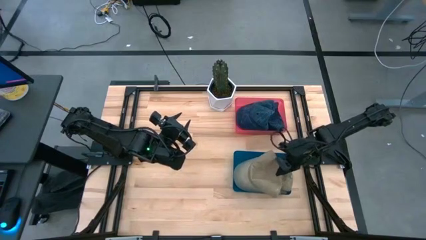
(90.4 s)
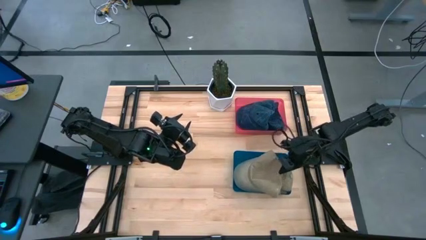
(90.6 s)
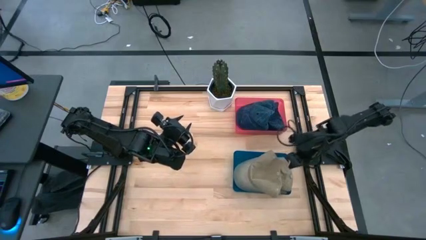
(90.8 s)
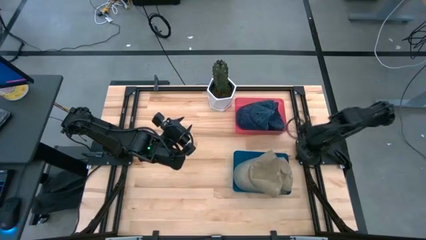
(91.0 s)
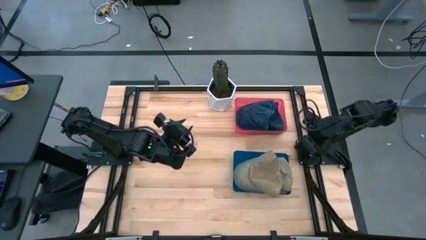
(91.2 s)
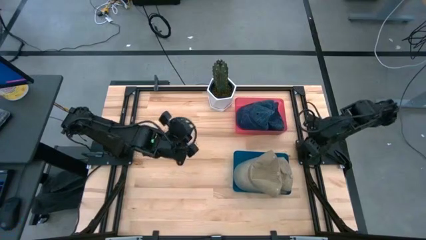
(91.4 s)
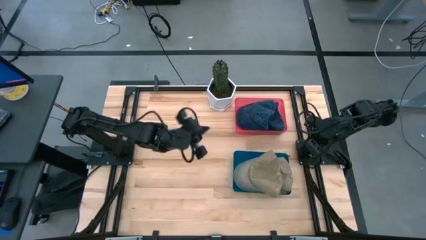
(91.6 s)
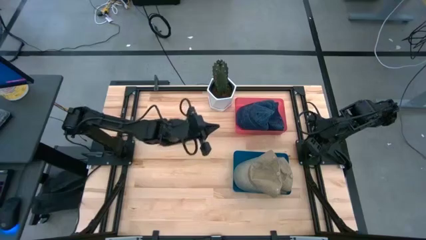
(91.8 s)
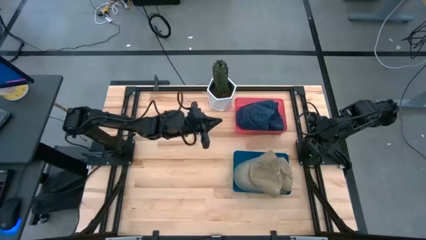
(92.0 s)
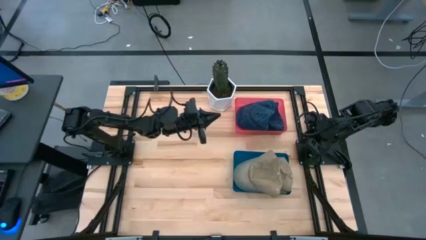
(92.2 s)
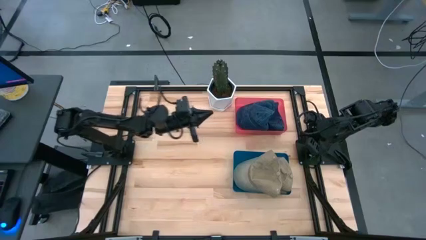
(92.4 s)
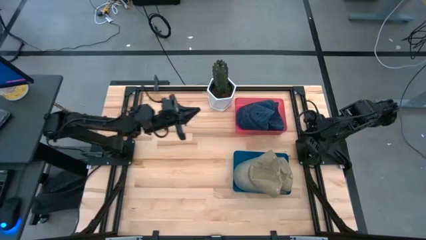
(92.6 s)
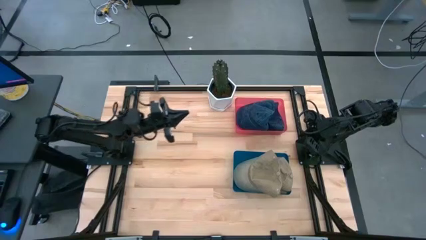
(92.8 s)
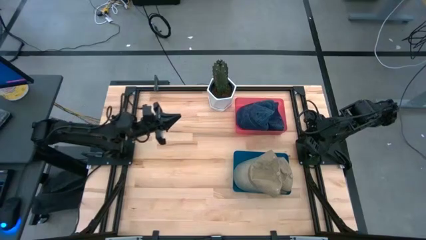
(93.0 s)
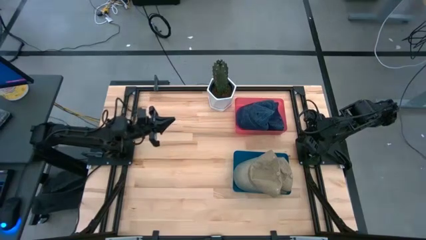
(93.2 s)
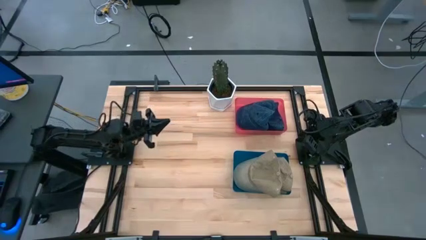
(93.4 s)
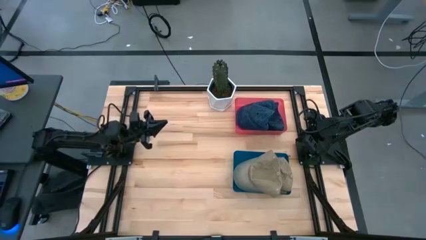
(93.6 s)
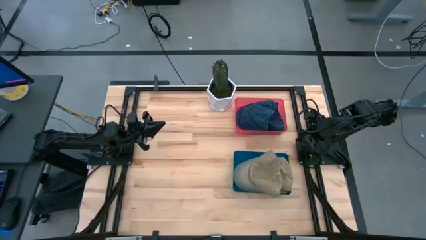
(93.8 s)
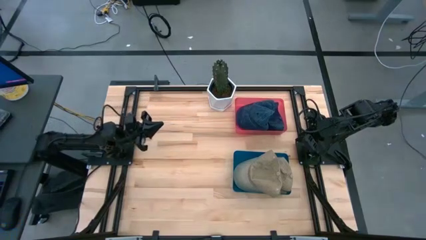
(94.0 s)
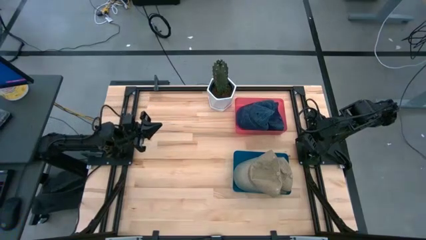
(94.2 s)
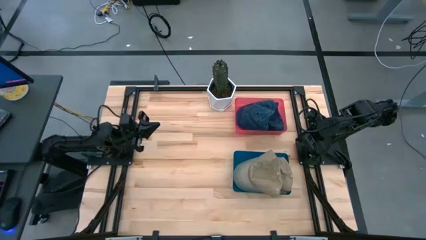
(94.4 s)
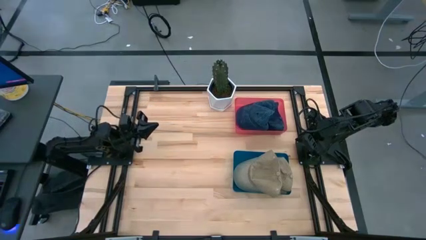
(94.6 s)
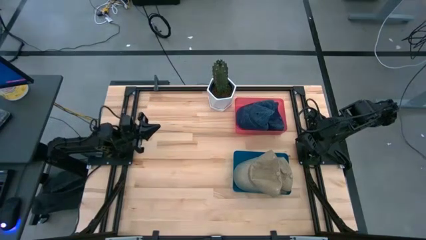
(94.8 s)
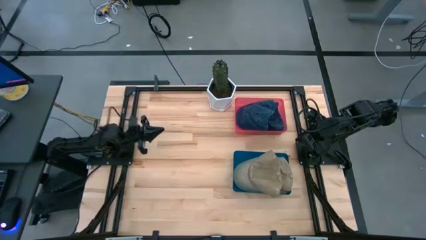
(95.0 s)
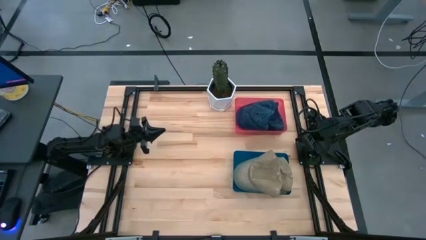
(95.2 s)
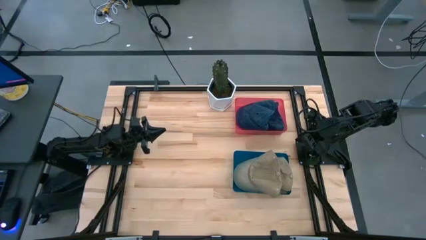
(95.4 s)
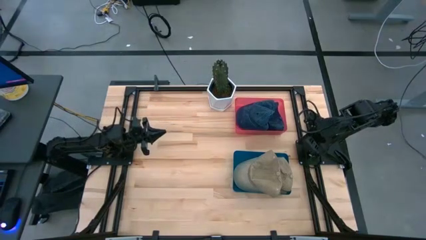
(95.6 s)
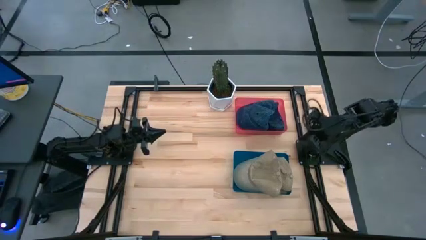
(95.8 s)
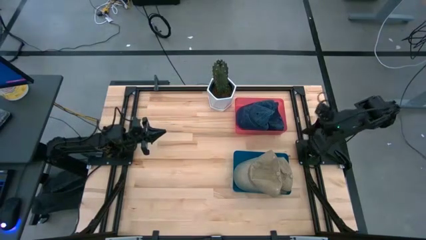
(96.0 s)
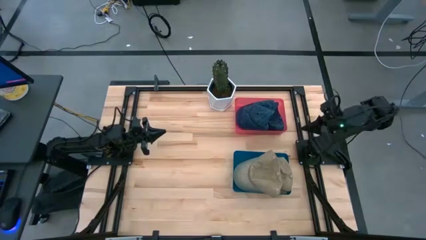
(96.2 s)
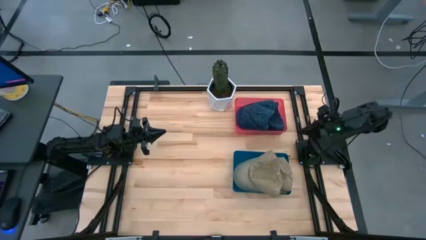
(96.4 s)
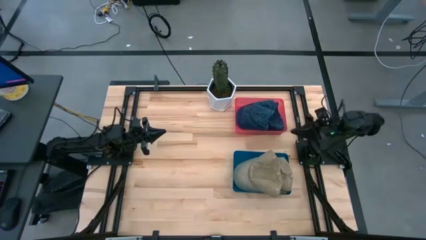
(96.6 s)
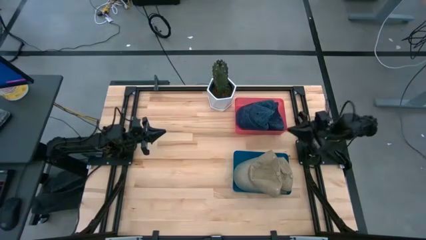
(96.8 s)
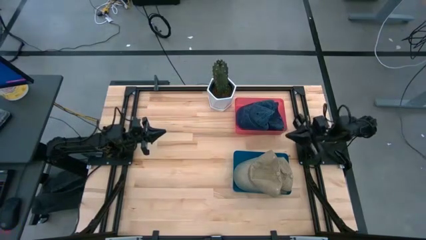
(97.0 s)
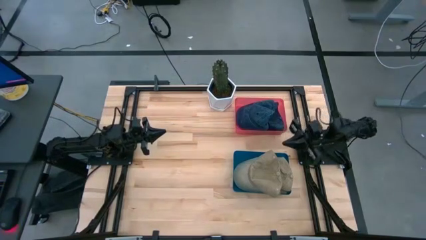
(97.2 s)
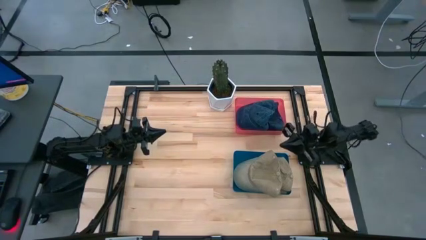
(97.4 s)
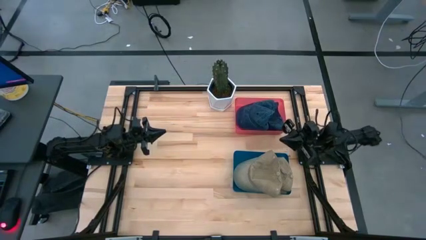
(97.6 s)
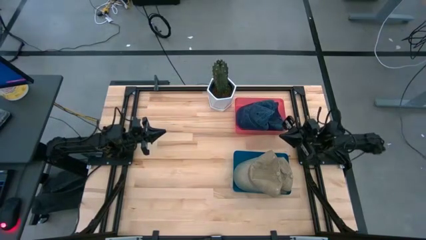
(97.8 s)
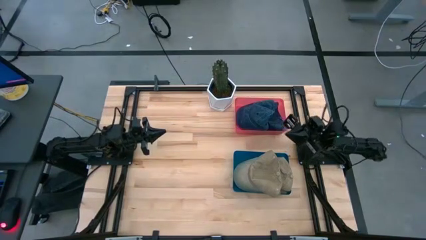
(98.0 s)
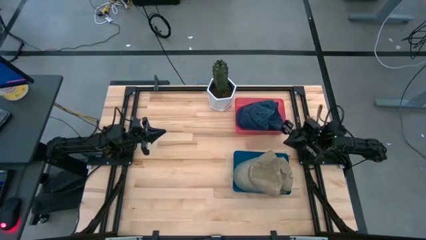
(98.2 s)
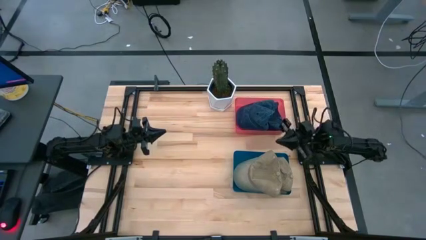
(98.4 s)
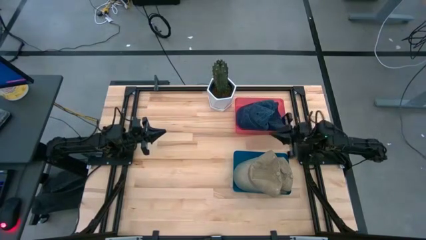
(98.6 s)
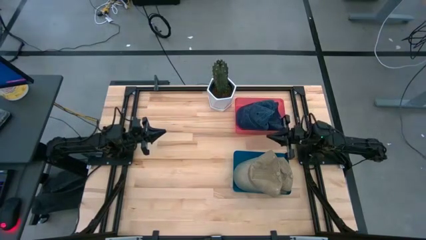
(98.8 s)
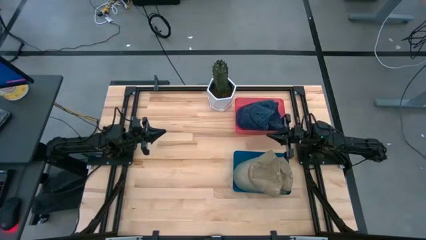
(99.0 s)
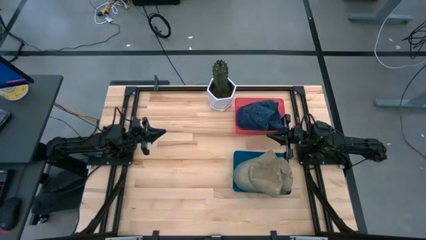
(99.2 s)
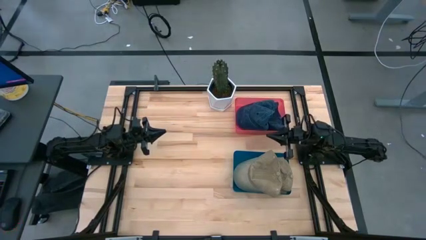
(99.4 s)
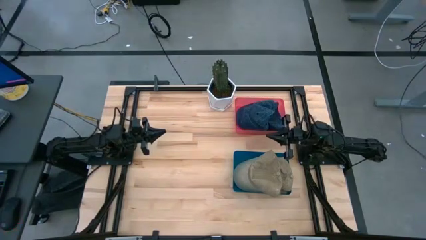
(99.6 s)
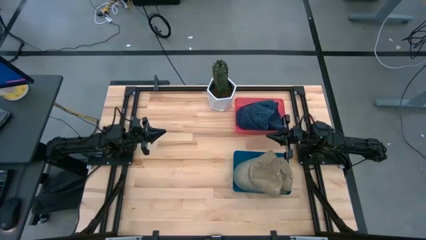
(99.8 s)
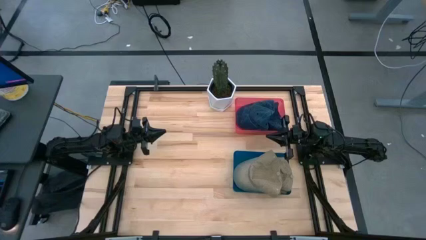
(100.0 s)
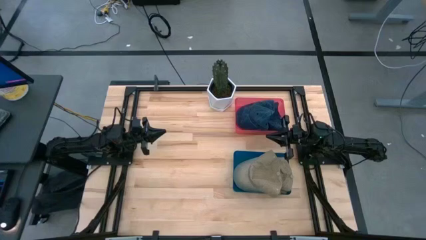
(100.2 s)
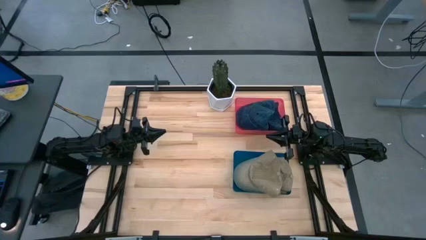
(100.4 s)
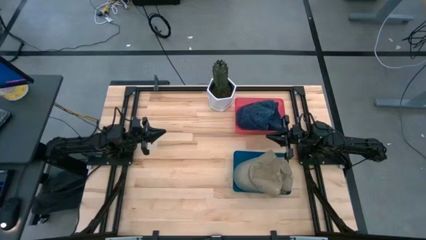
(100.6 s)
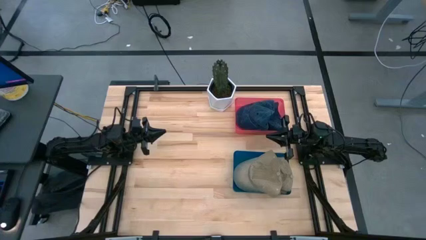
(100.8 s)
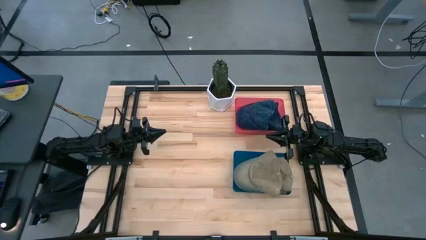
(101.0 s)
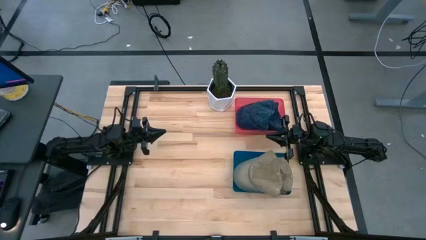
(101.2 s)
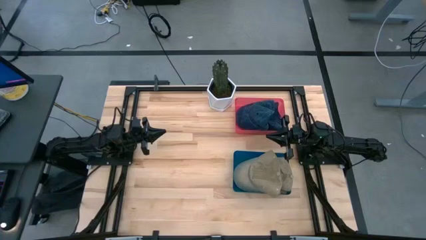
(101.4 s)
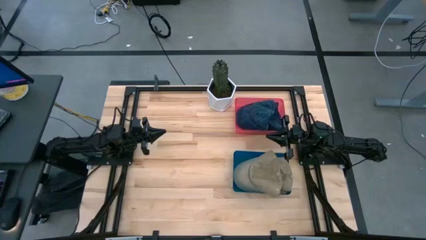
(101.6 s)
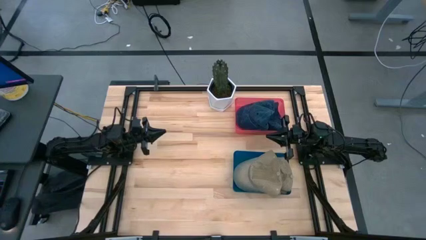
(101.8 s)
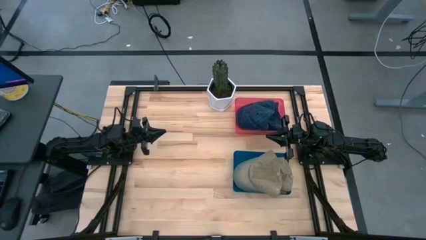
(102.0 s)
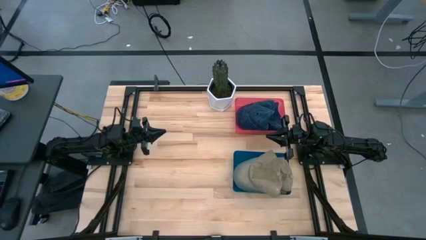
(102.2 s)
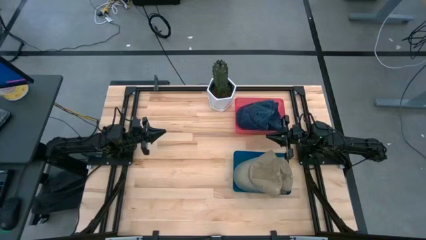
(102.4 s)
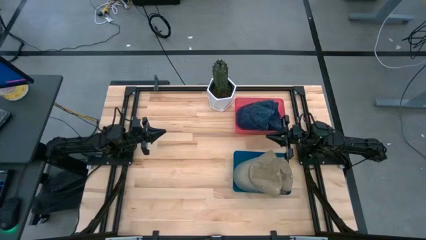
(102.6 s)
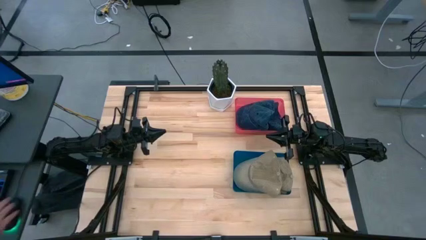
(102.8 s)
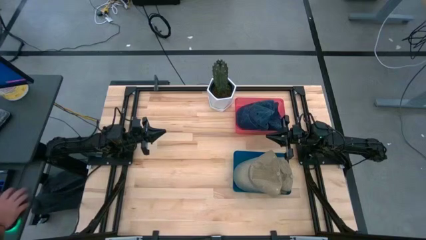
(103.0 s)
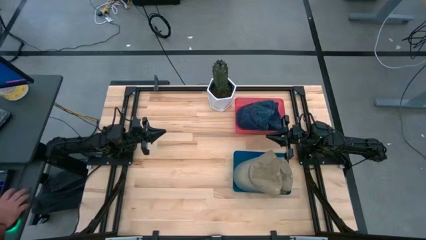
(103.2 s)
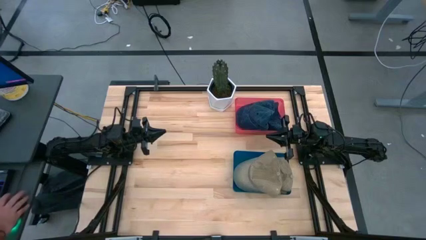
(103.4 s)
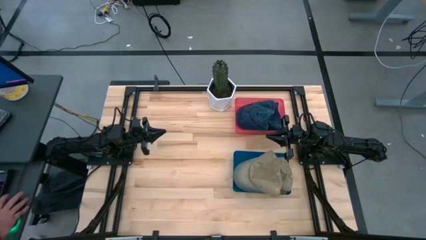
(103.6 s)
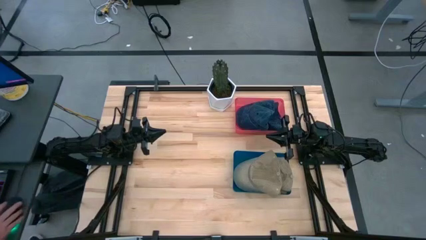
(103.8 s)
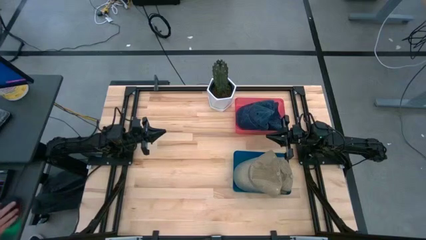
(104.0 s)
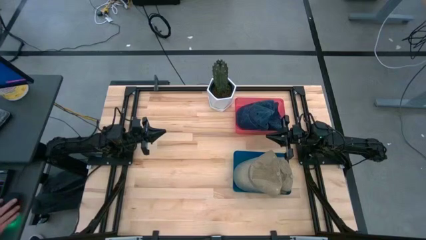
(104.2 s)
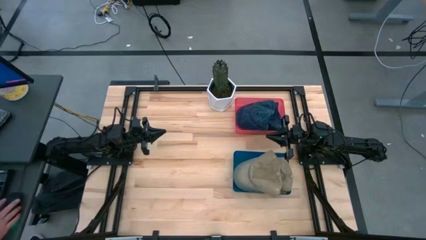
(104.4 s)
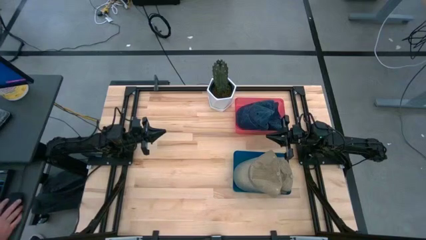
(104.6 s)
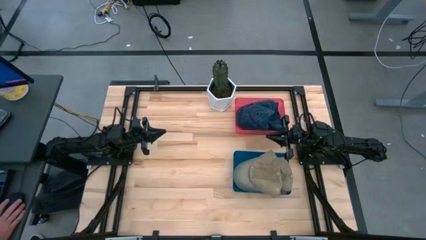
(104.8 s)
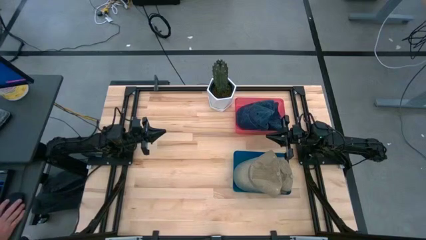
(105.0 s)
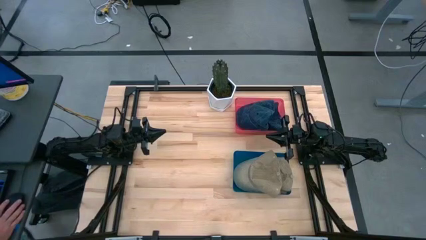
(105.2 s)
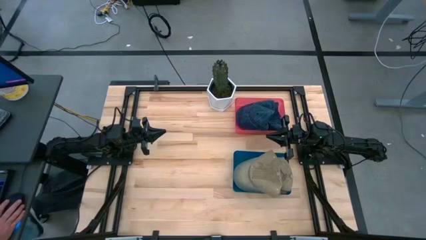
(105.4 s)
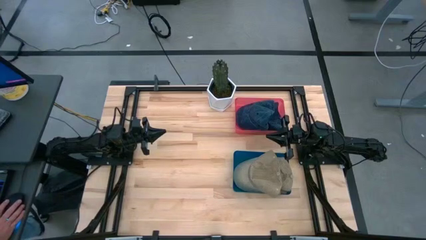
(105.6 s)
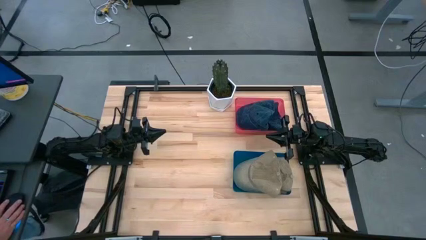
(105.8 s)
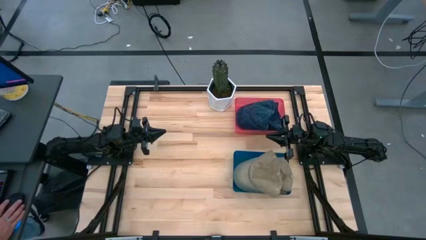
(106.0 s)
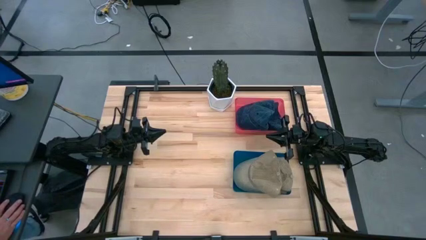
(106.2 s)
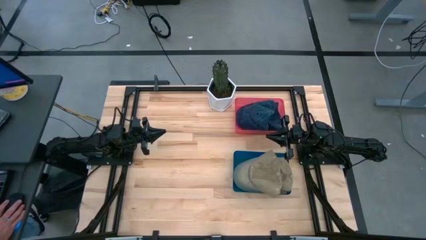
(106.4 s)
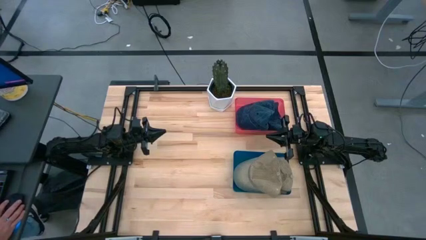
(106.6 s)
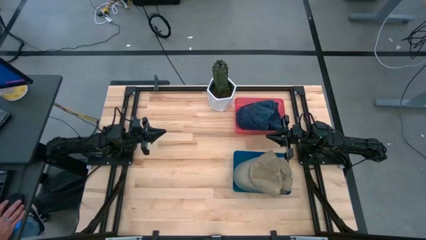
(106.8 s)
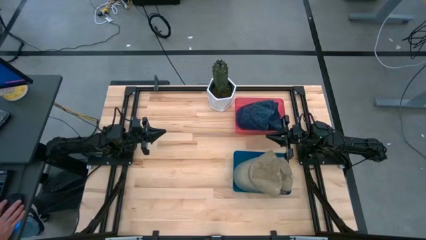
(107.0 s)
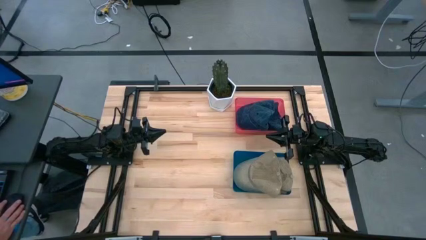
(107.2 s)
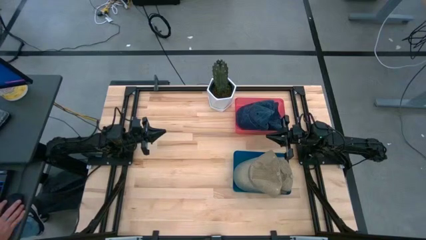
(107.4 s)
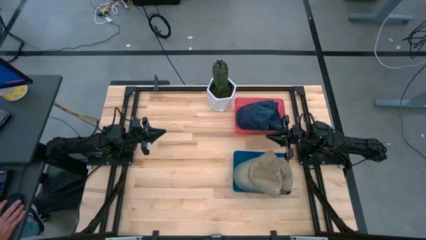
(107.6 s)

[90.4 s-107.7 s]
Task: Pick & Place hat
Return to Home Position
